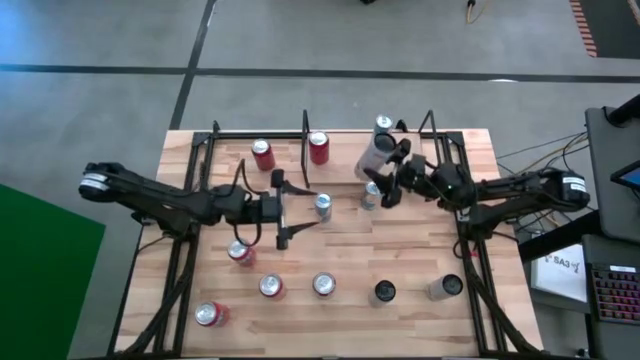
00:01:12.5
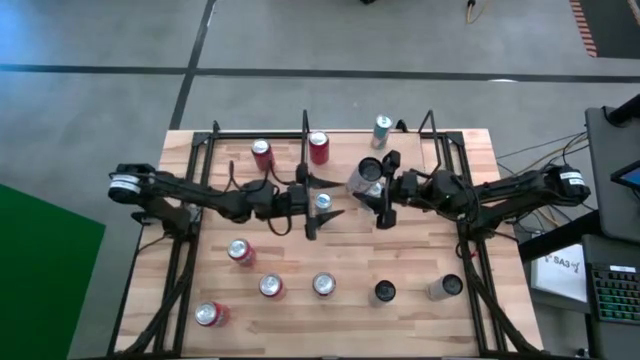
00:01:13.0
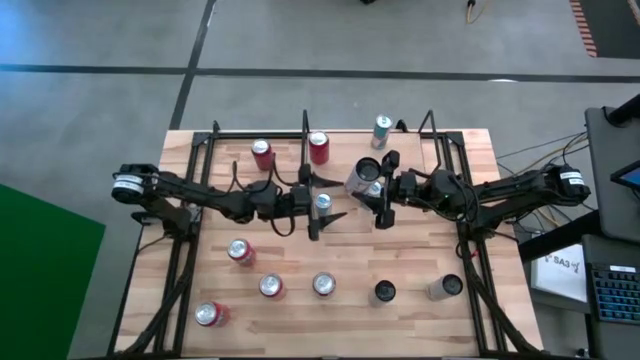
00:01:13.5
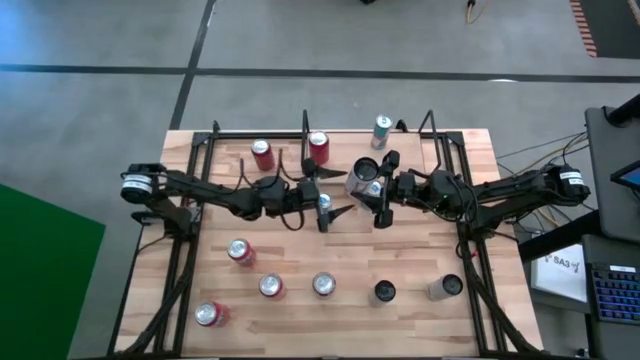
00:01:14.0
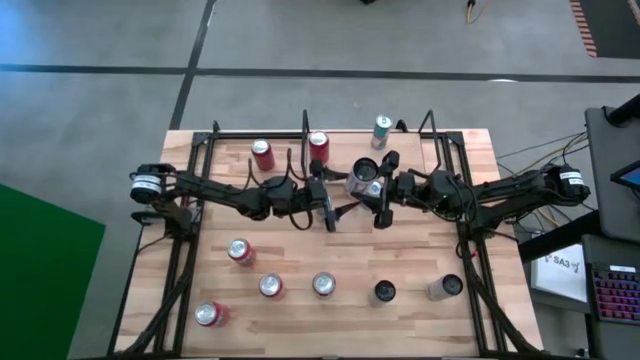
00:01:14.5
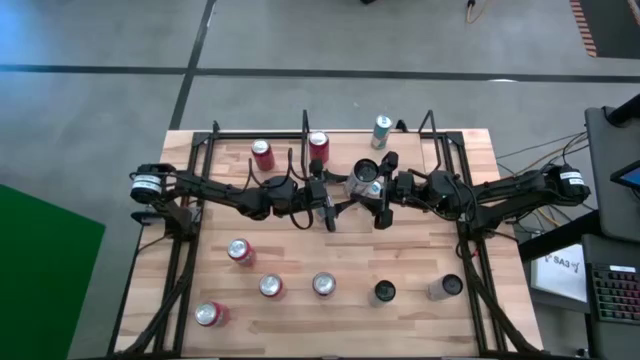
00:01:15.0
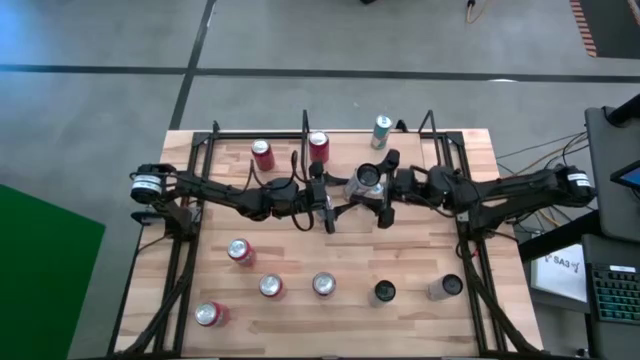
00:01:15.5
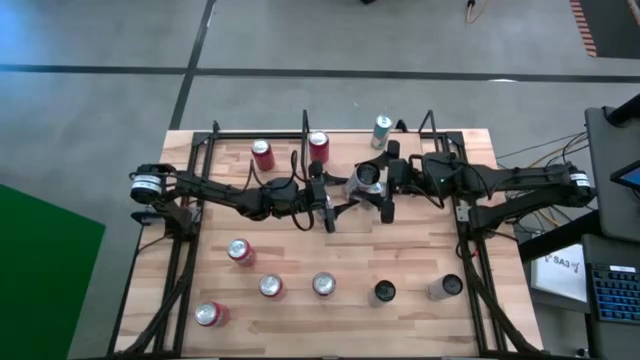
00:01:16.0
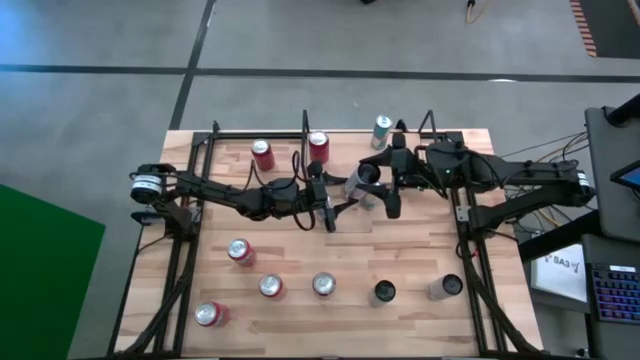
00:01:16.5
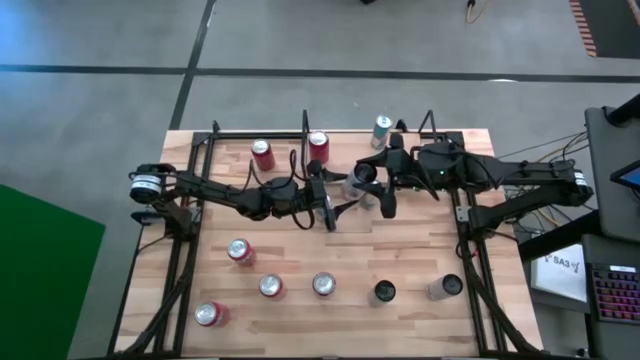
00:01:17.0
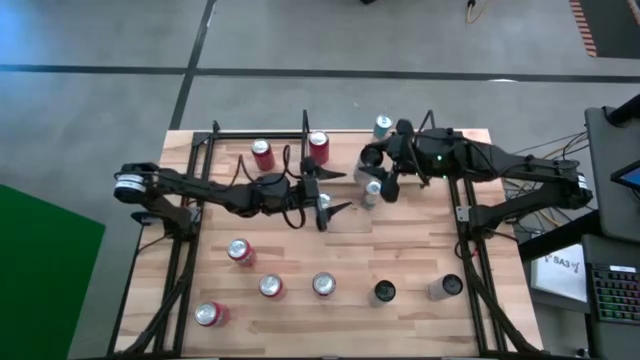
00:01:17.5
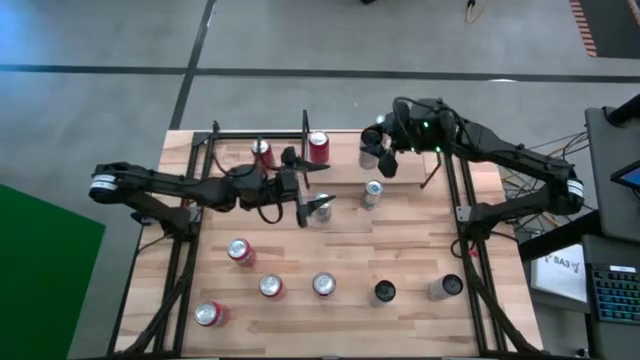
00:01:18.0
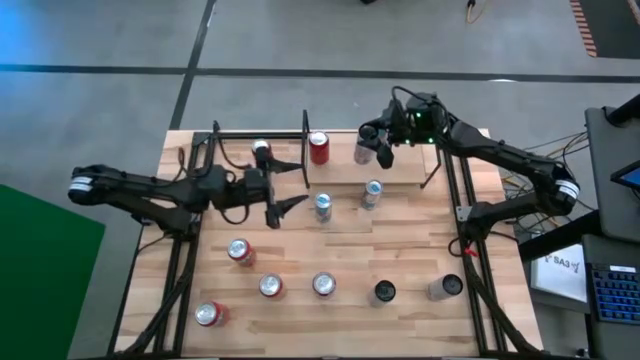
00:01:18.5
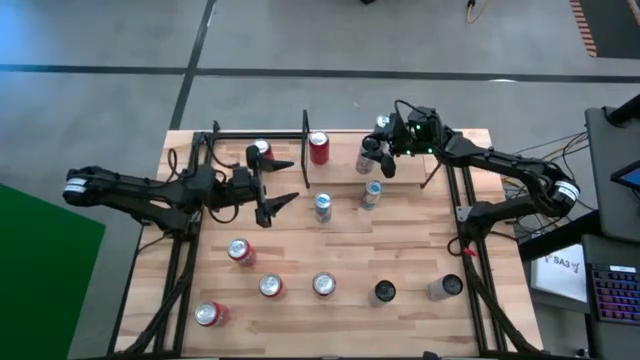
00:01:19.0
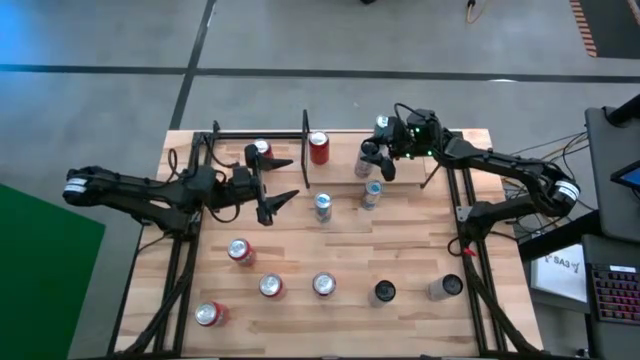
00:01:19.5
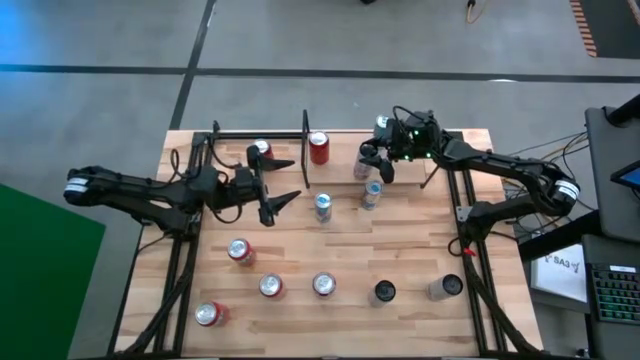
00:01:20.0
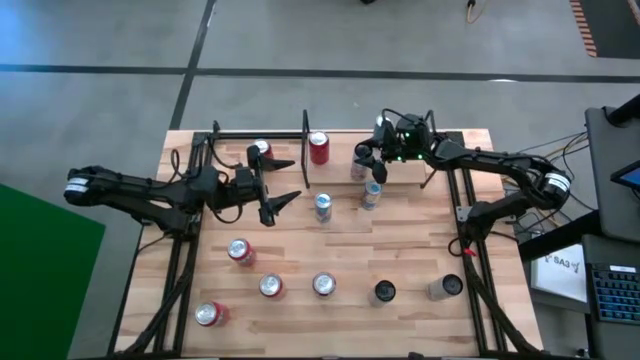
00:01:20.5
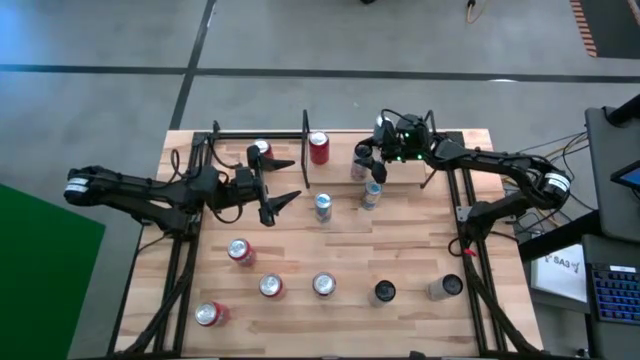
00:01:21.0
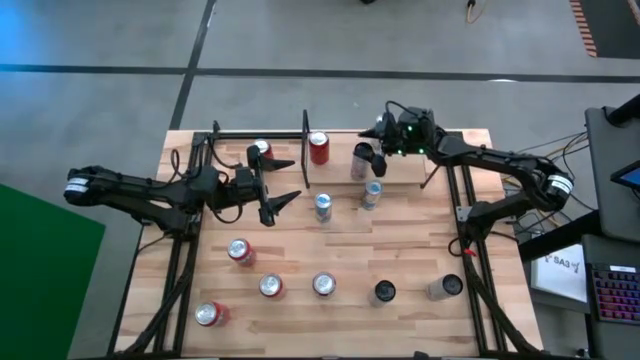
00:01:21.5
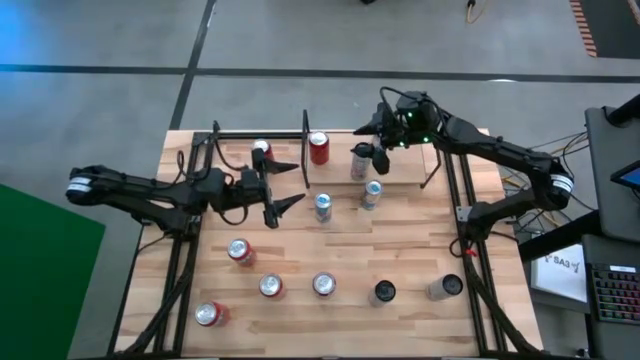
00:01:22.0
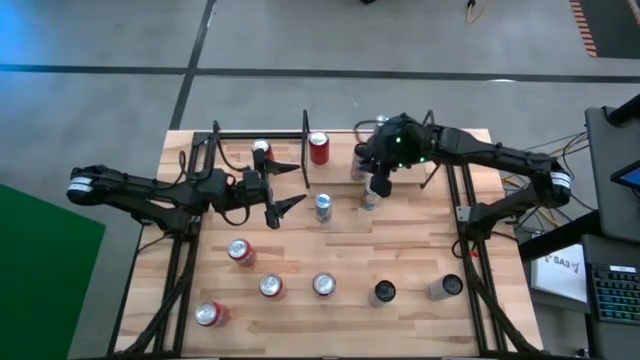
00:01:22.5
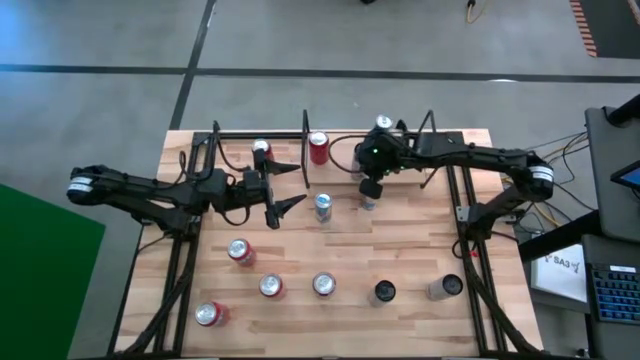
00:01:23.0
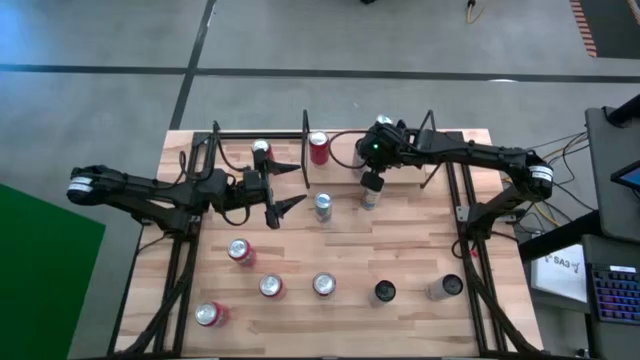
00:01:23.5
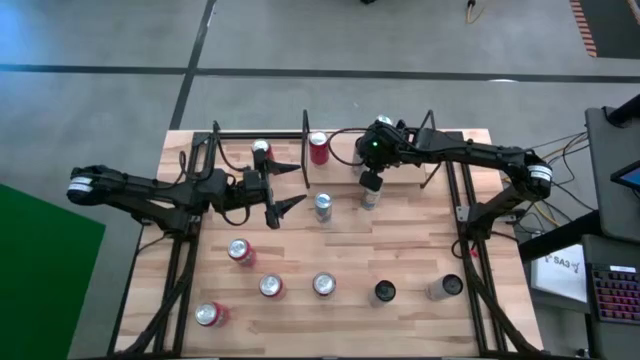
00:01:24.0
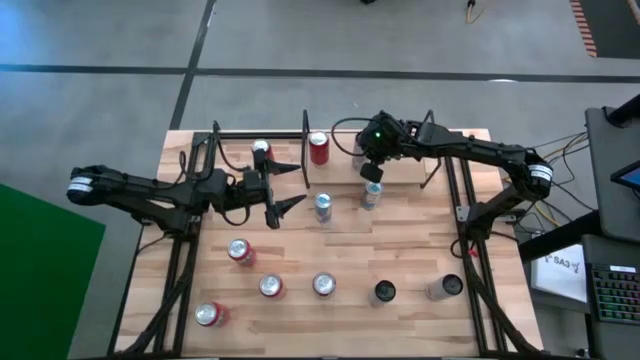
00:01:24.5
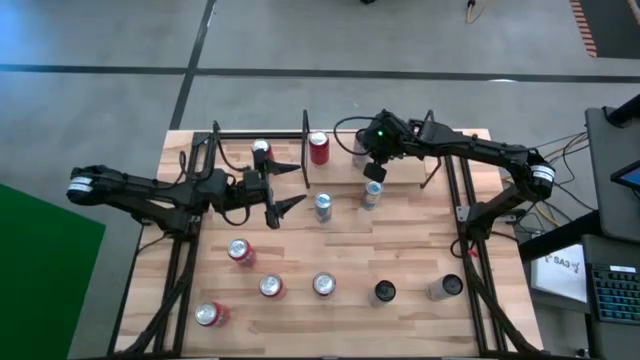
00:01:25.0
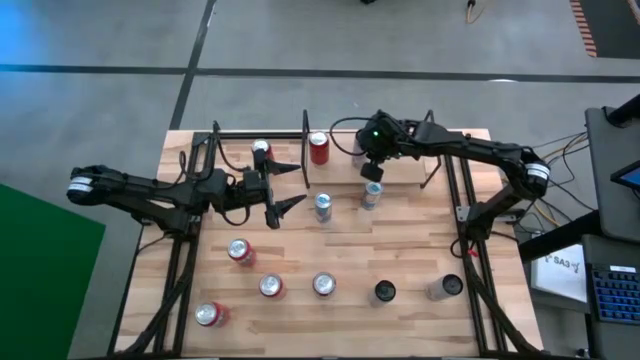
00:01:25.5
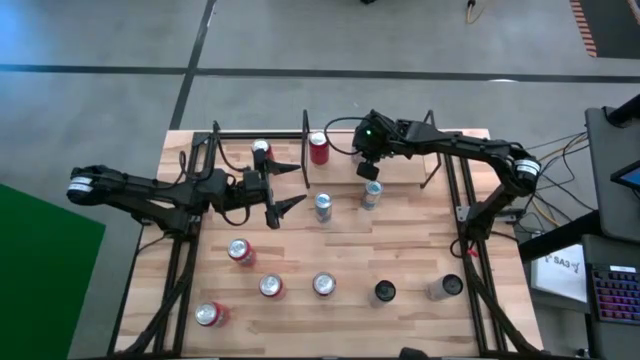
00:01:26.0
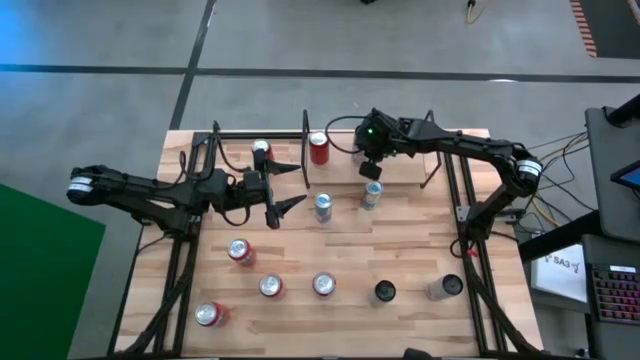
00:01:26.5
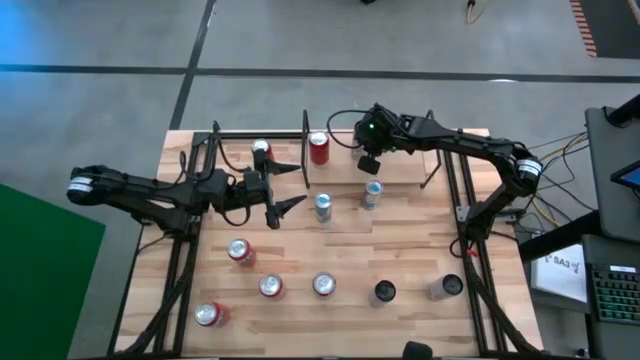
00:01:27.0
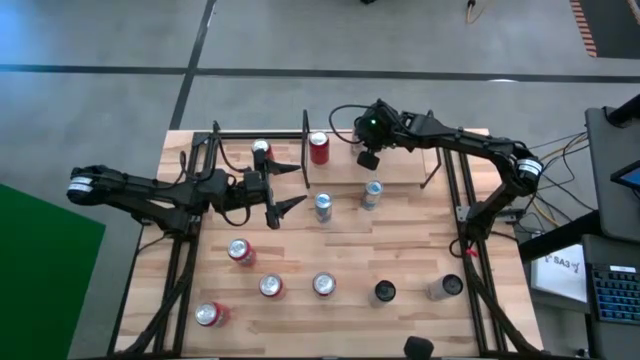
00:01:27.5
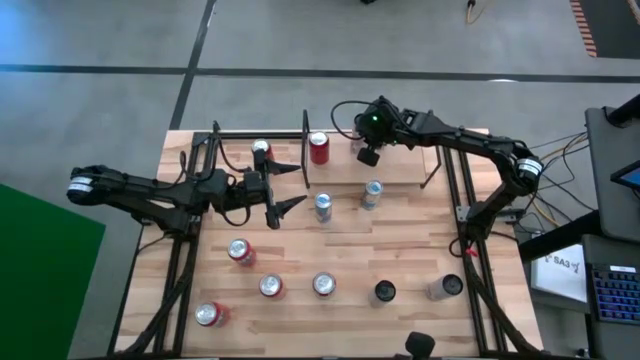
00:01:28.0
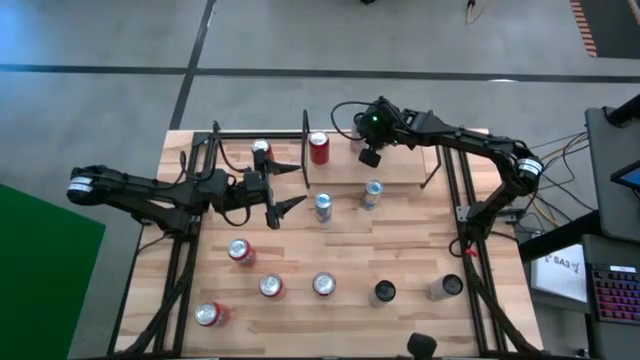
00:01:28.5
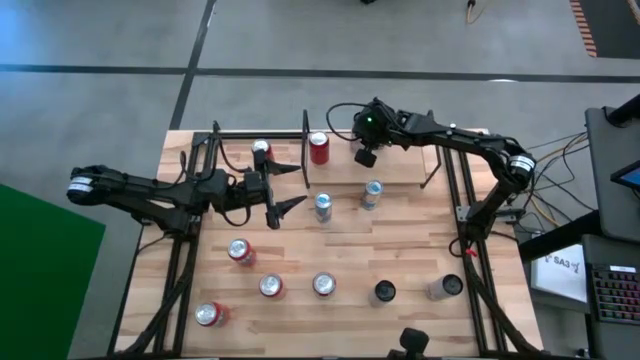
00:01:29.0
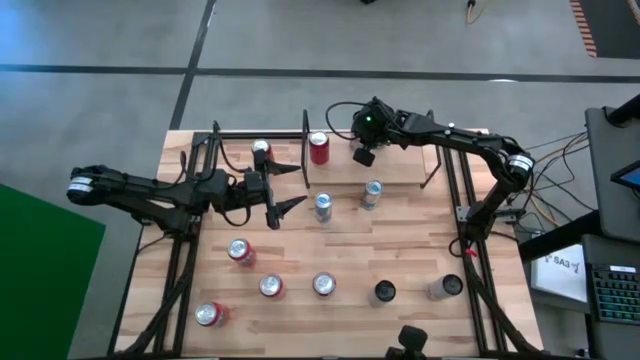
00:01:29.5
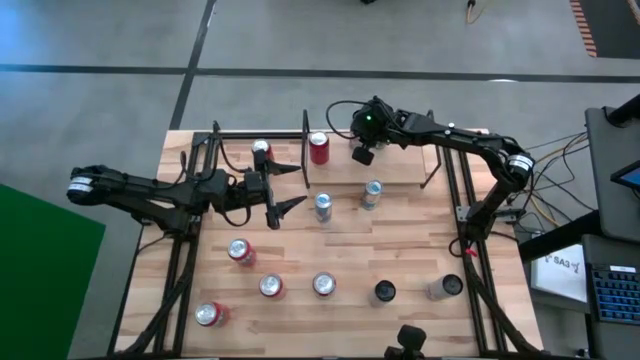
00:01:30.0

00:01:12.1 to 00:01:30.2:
Task: Place canned beverage on shelf
Put the white and pink soda can on the shelf

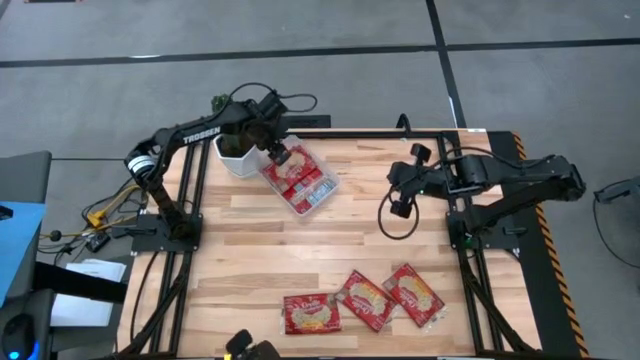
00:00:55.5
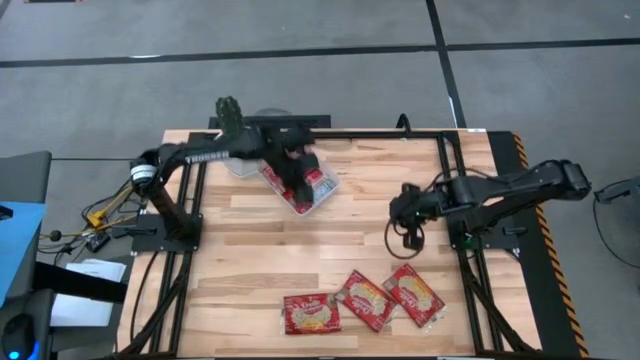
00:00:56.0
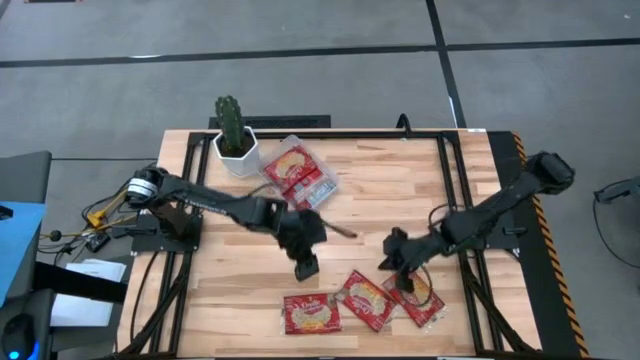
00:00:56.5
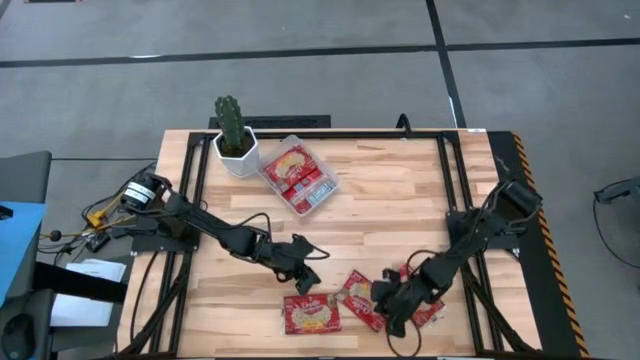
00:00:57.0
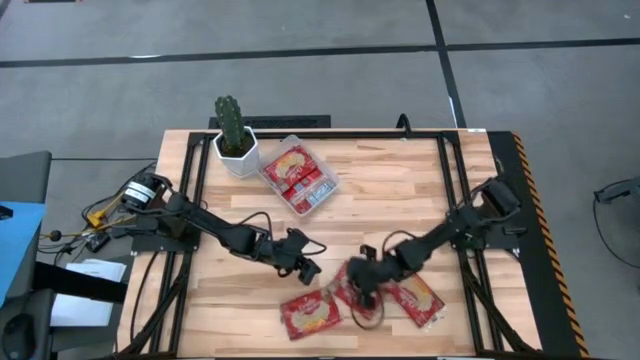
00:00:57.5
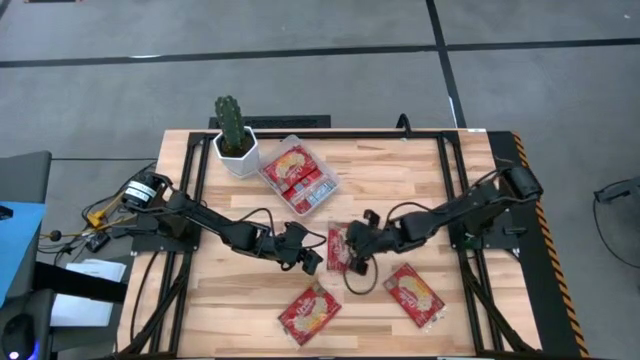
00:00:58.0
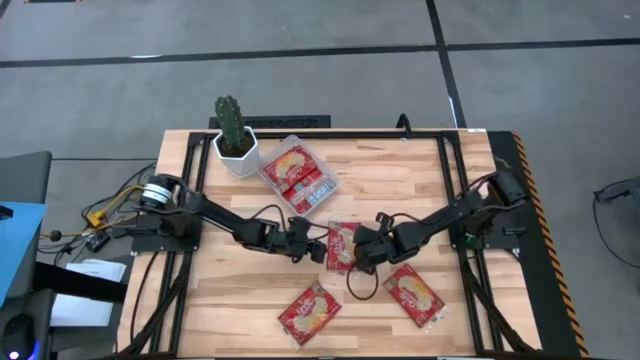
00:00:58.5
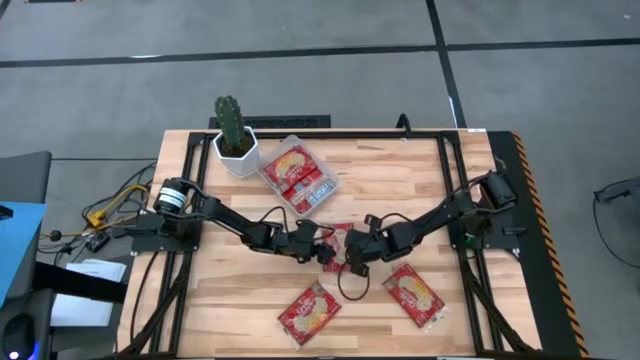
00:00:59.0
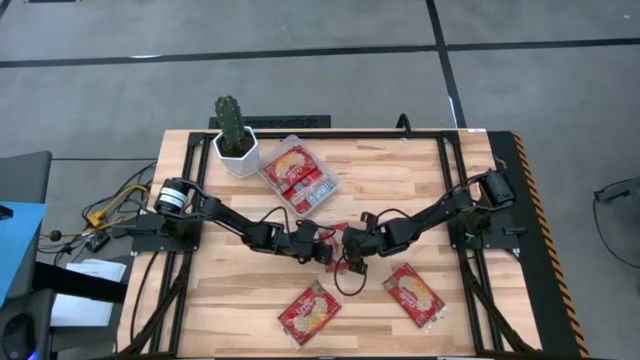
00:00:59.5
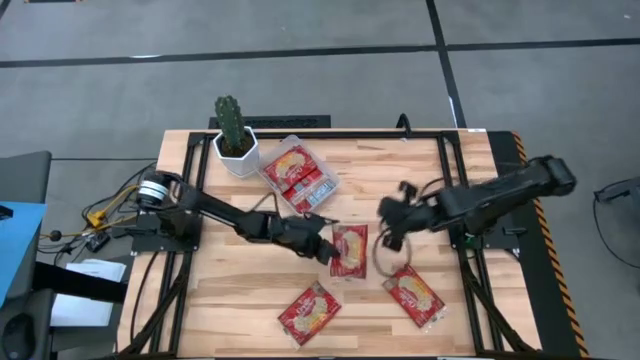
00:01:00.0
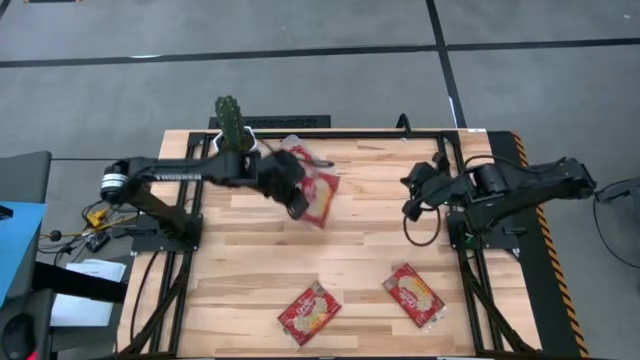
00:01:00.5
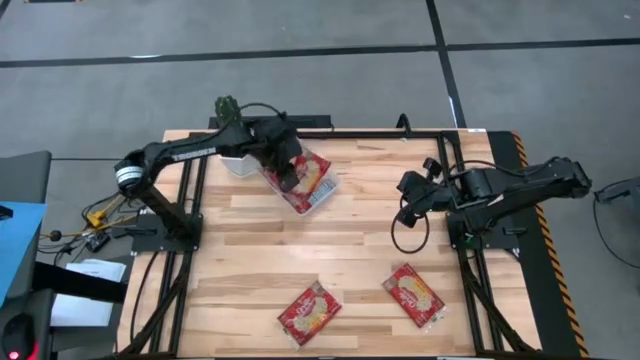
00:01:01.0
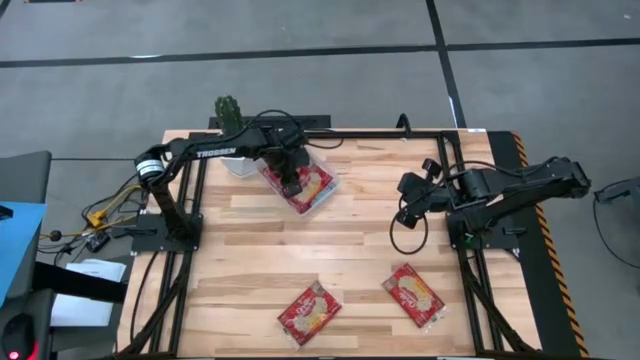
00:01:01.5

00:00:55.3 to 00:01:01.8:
Task: Sort popcorn bags into baskets
Put the red popcorn bag into the transparent bin
